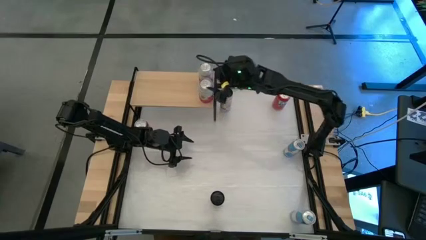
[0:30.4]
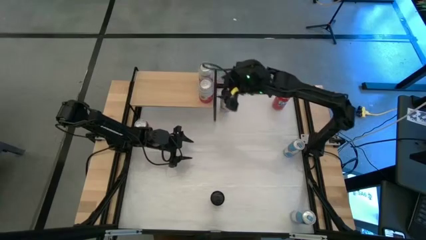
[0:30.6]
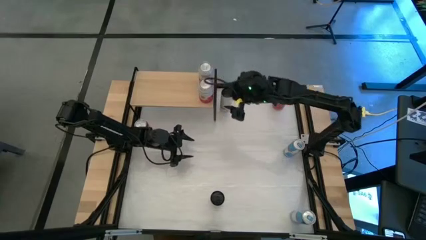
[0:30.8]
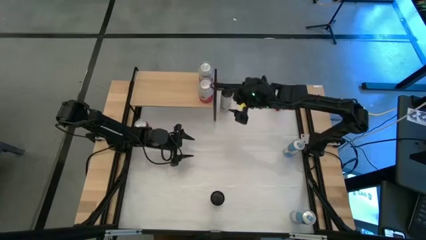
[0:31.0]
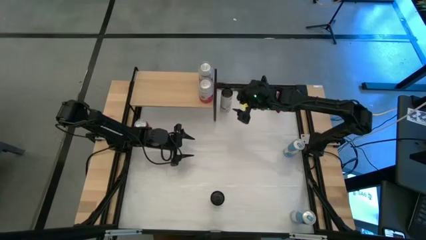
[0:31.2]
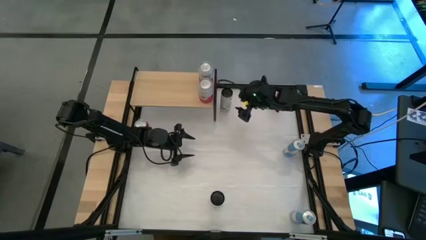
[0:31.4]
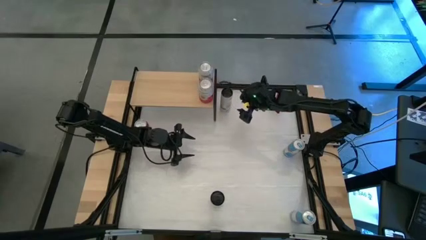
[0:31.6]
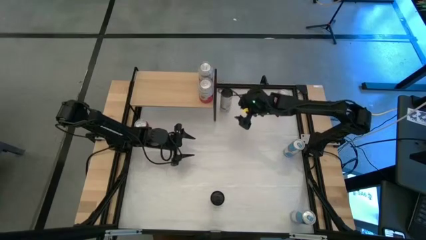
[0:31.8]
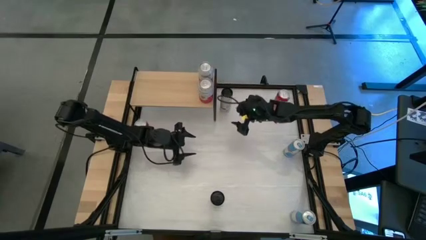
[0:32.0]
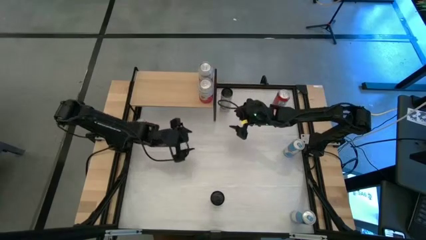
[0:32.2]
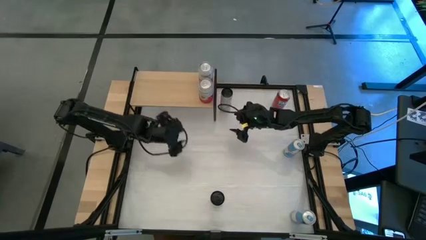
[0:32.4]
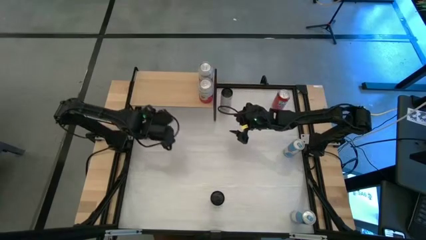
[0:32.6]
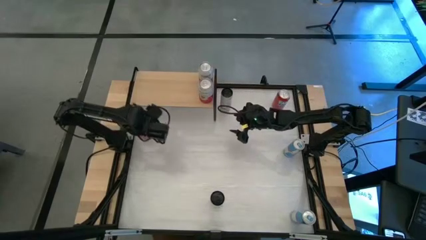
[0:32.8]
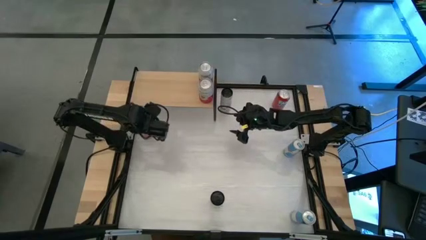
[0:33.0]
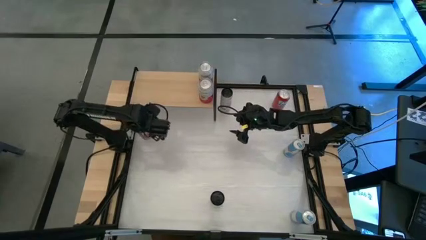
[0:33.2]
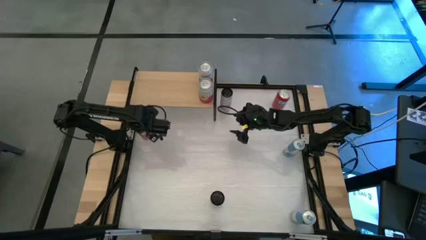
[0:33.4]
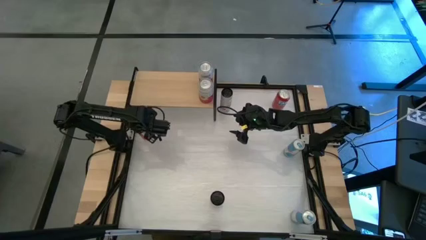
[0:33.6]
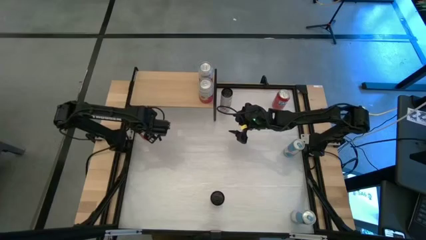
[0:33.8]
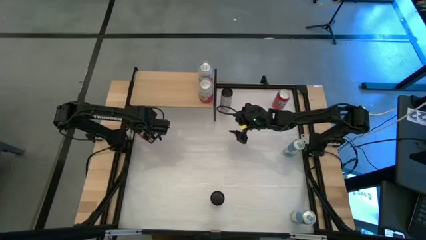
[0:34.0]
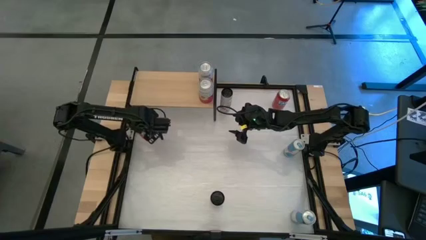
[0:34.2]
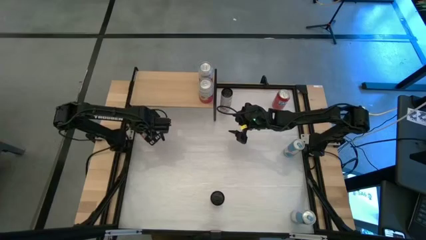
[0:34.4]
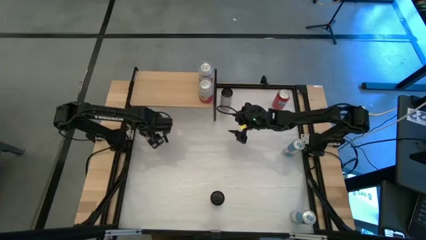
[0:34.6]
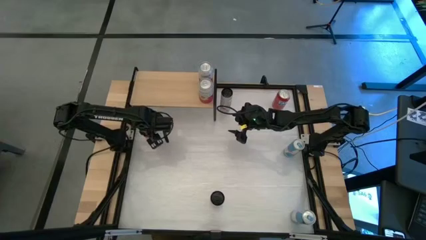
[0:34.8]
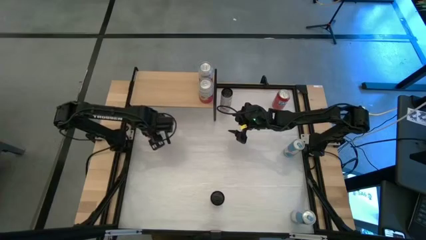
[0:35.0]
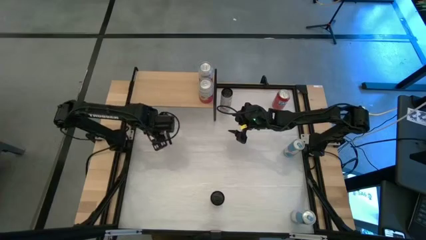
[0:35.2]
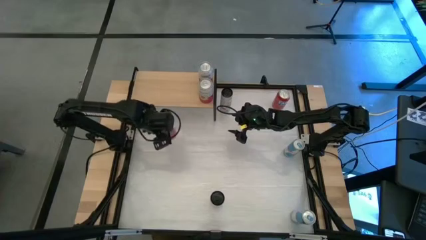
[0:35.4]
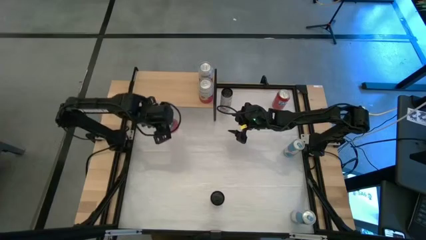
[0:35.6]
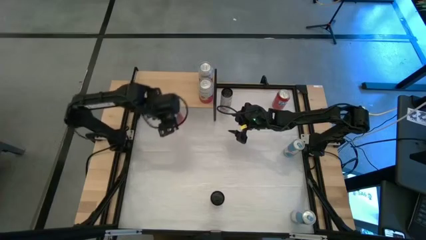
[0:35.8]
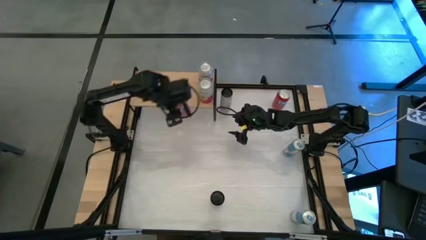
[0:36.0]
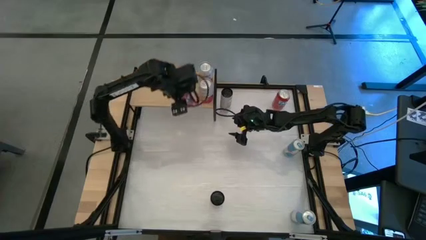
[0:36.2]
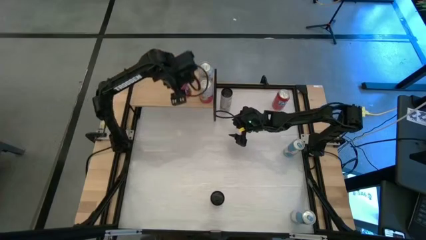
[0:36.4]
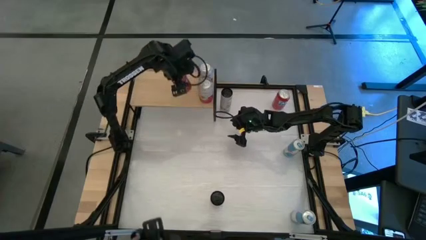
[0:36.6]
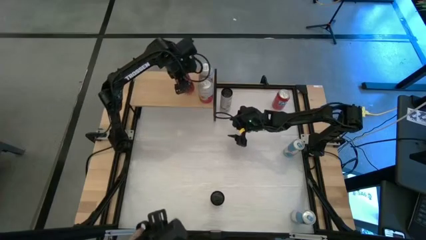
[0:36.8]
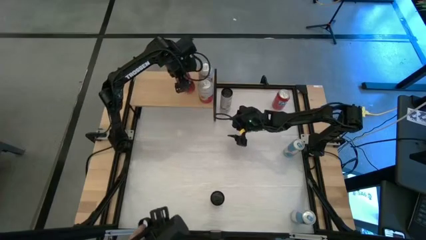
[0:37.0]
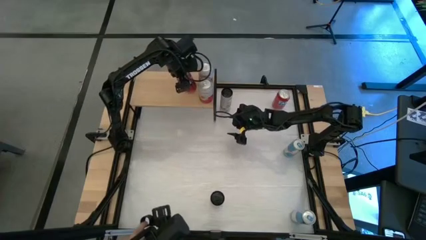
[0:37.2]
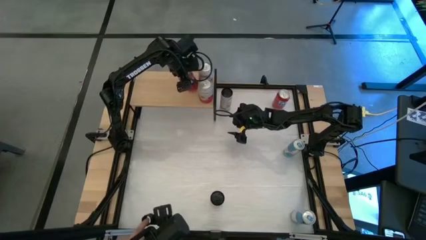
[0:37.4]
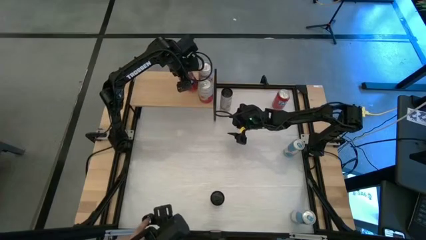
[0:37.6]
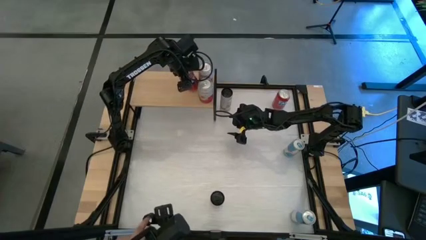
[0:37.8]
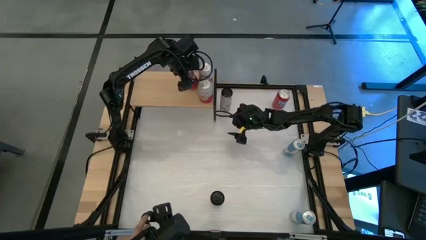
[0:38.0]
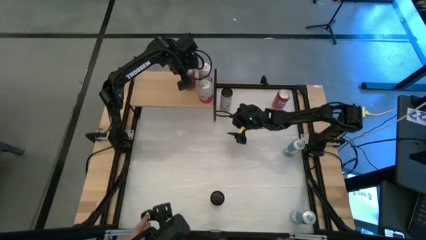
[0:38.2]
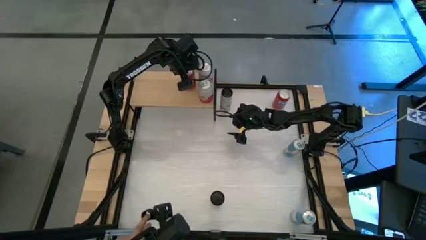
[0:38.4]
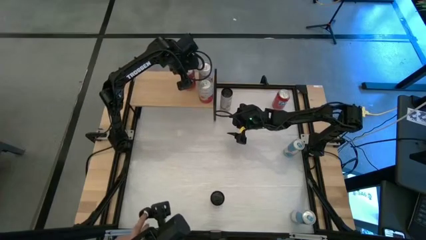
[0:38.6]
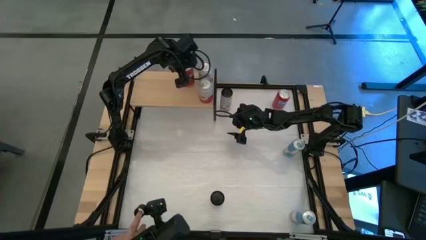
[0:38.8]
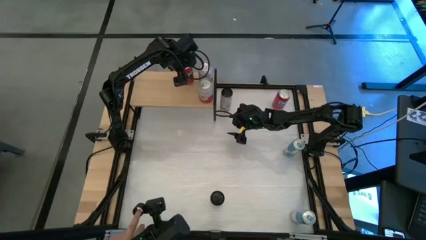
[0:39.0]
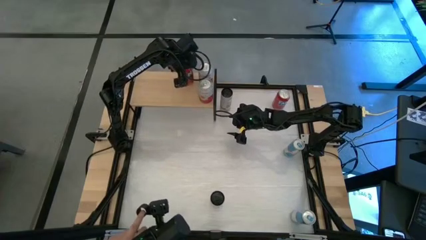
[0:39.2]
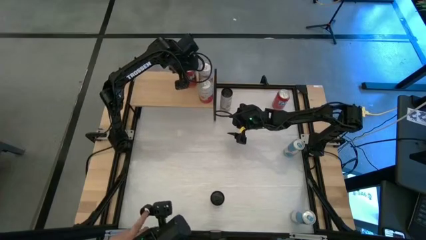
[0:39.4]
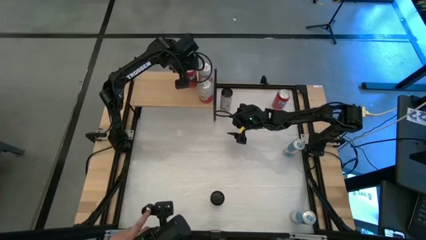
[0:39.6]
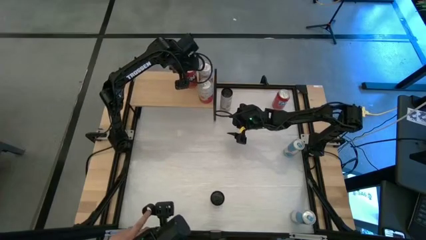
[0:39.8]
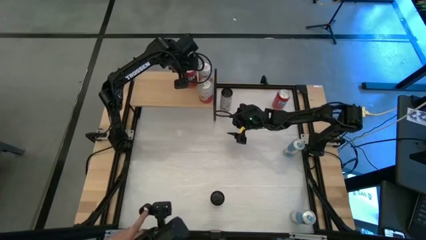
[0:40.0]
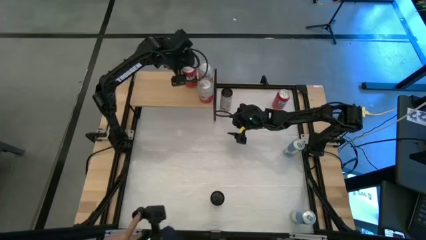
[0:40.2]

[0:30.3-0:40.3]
Task: Place canned beverage on shelf
Put the left red soda can on the shelf

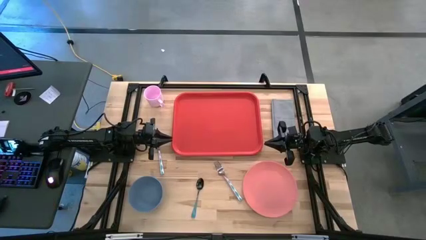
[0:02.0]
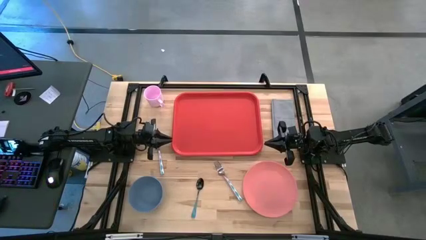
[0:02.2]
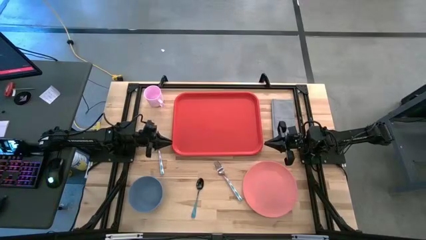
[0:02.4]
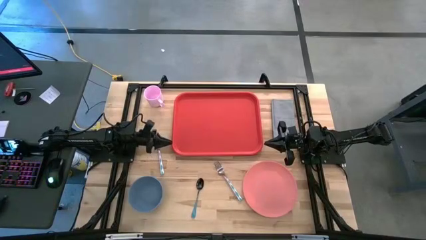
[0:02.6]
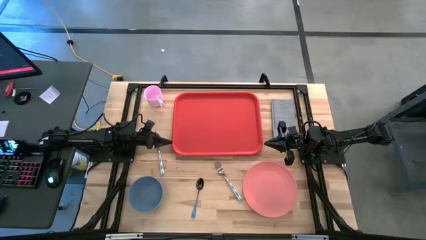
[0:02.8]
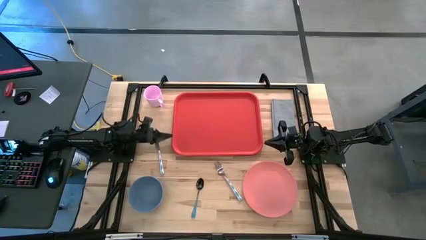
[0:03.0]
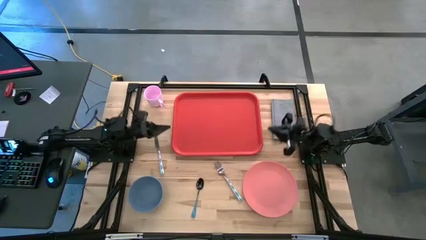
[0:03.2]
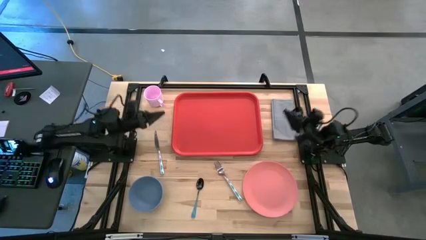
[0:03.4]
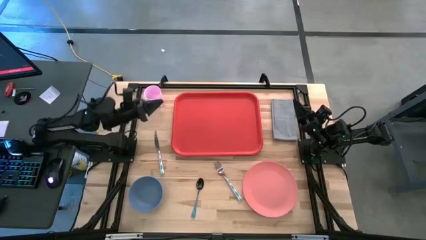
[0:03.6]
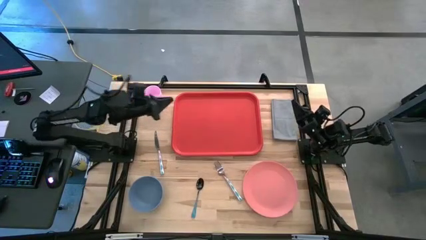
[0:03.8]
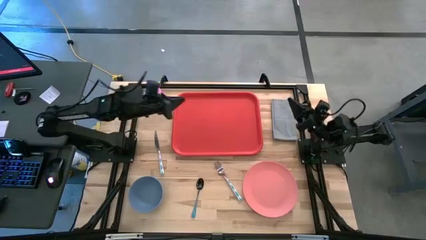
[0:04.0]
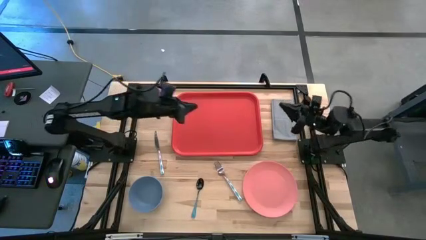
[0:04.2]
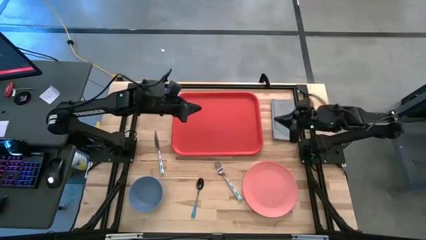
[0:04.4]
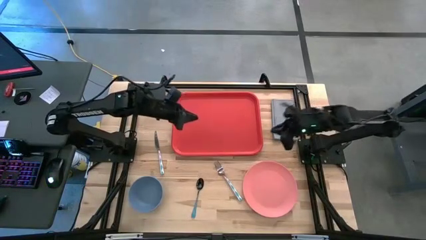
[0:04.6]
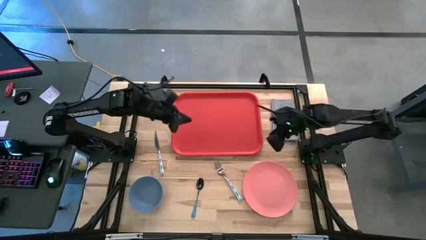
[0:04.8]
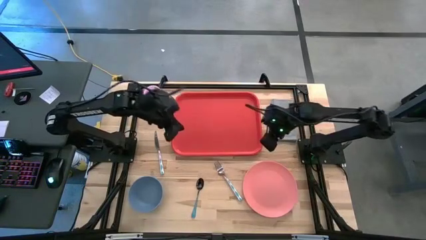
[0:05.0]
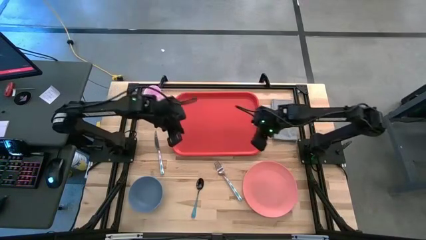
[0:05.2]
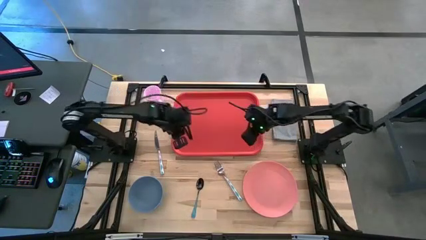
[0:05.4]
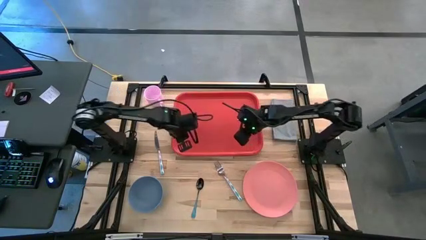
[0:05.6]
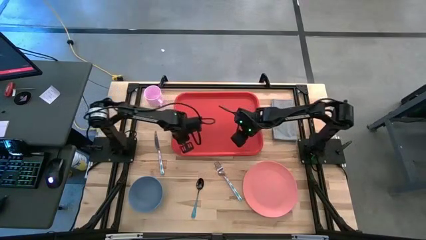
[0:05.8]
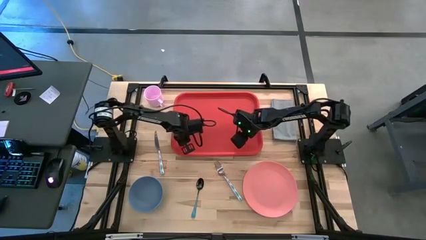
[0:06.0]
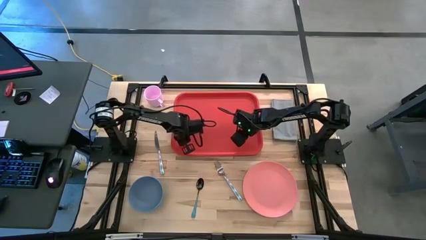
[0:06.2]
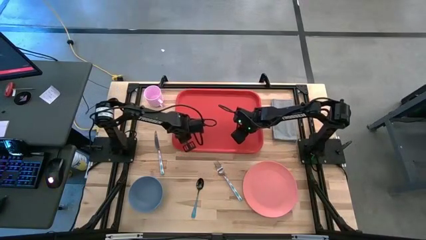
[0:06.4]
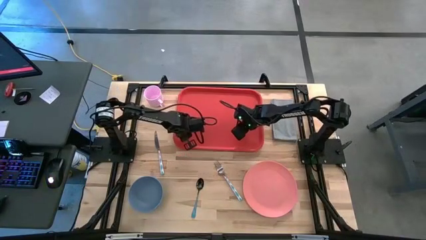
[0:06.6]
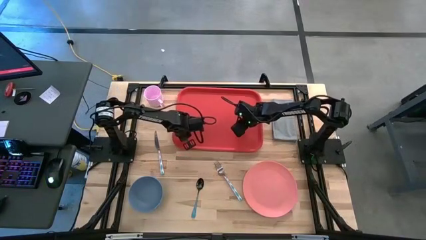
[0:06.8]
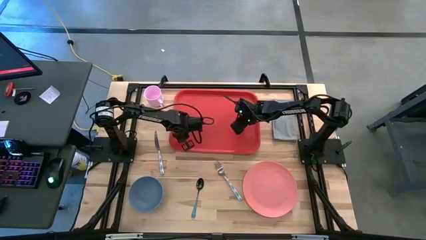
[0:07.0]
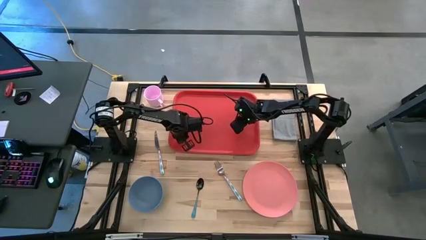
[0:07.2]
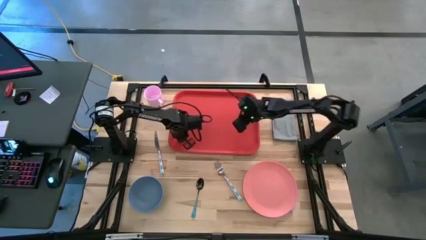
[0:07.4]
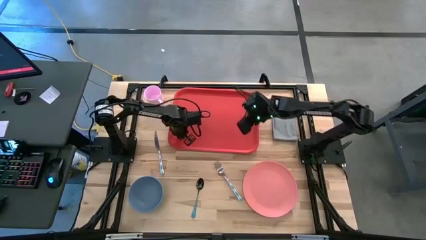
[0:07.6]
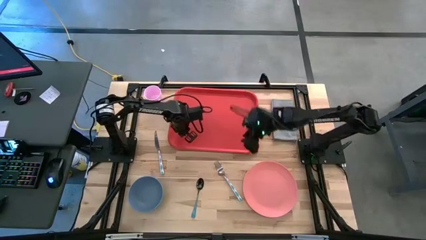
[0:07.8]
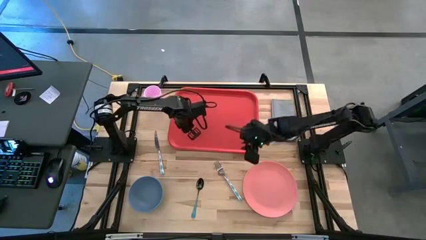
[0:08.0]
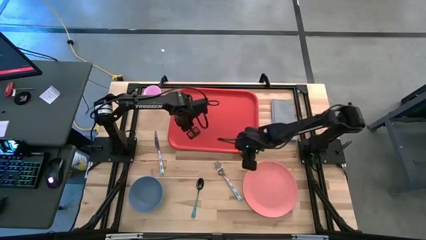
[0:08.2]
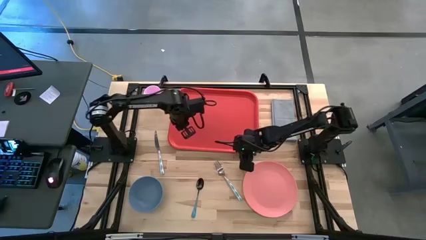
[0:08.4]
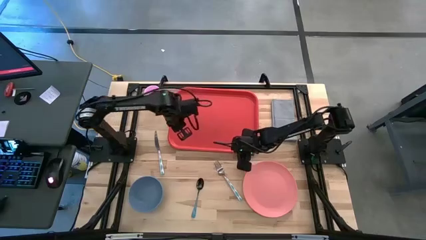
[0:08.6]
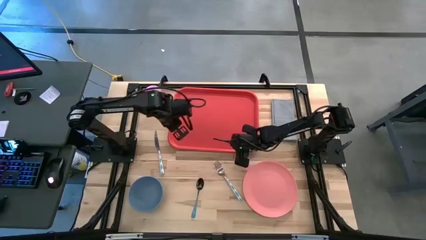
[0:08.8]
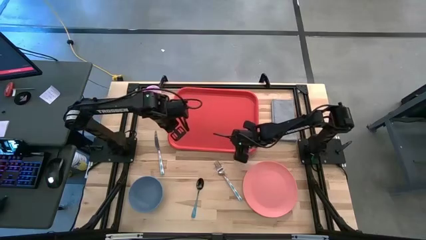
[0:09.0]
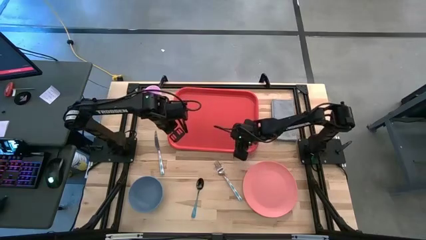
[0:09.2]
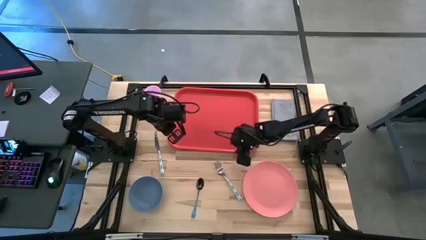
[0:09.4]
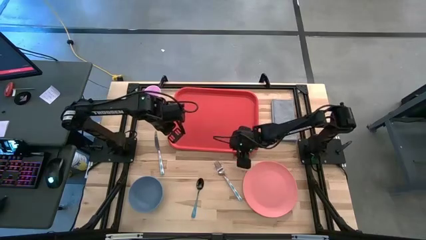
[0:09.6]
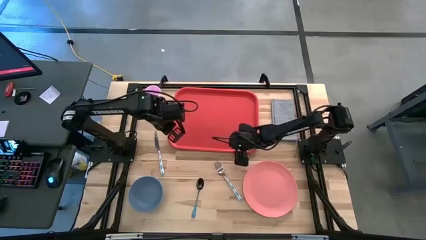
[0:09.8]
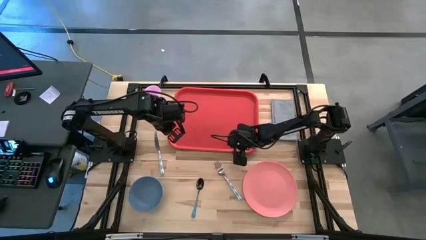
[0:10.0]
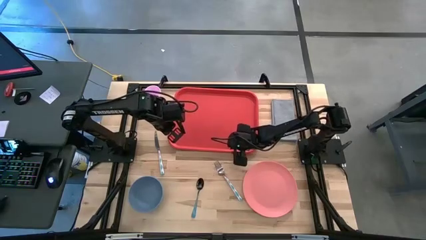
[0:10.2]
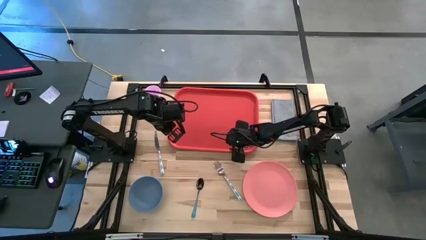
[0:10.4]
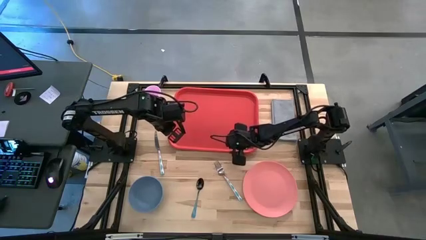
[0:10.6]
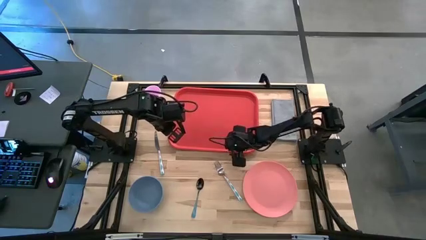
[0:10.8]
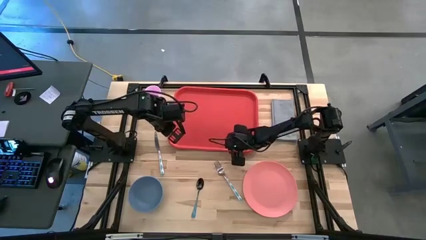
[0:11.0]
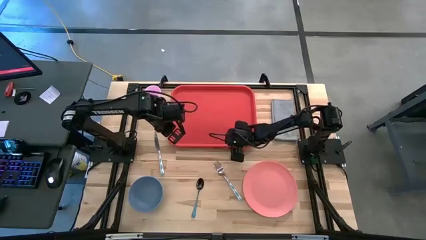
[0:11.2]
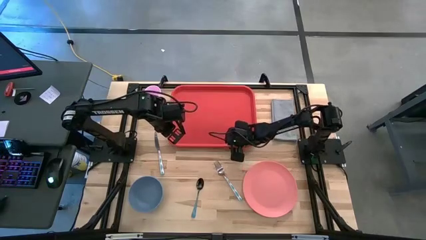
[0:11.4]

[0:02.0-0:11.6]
Task: Set up tray
Adjust the red serving tray on the table
